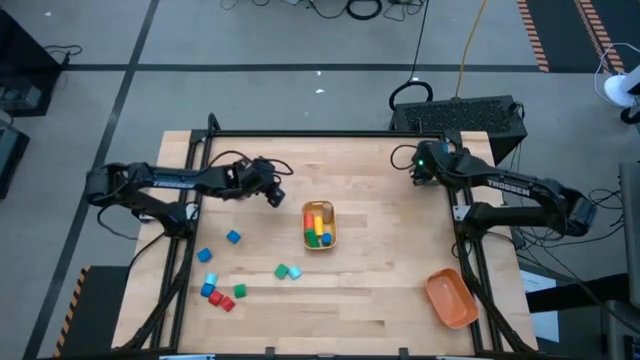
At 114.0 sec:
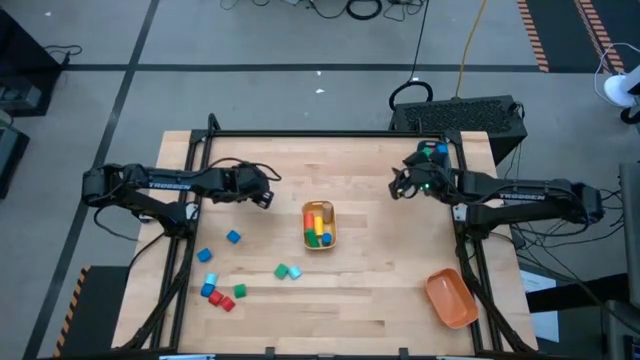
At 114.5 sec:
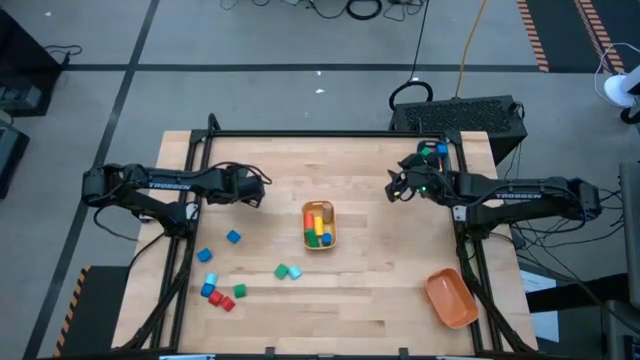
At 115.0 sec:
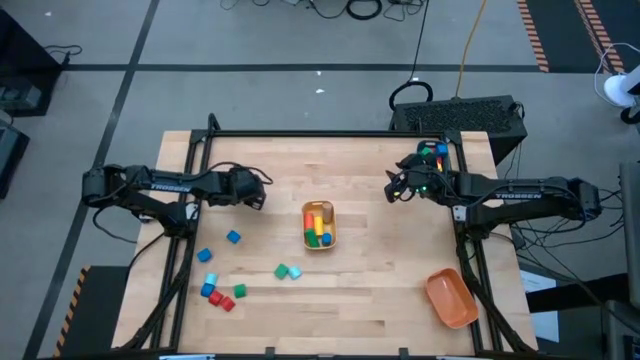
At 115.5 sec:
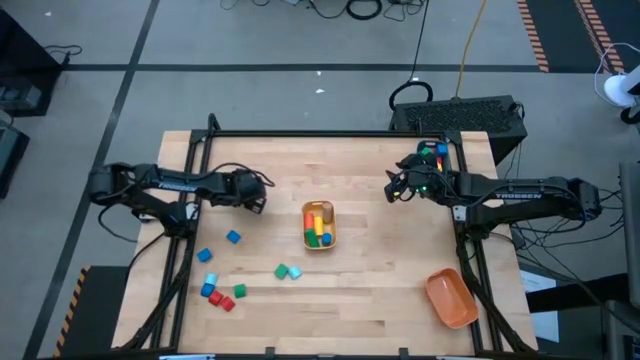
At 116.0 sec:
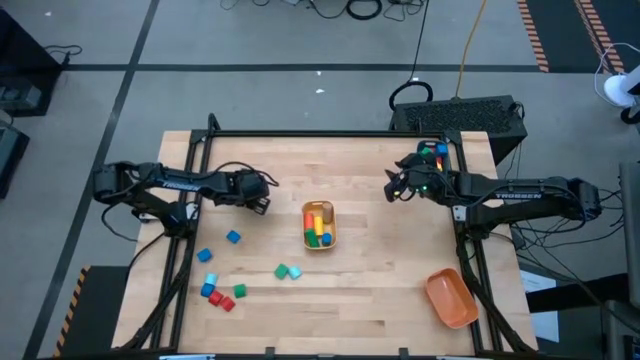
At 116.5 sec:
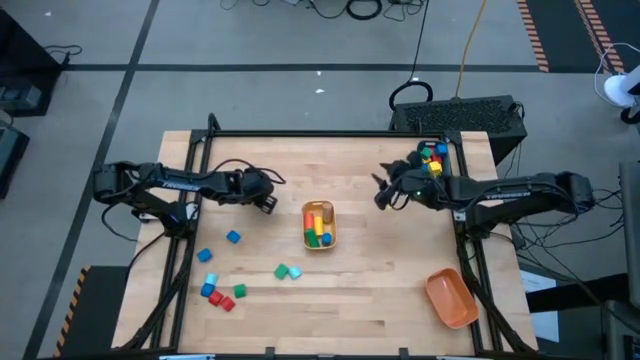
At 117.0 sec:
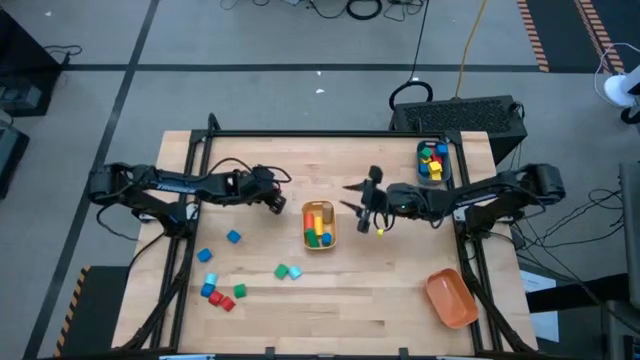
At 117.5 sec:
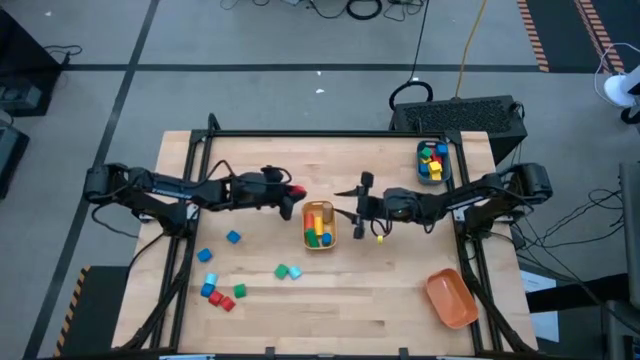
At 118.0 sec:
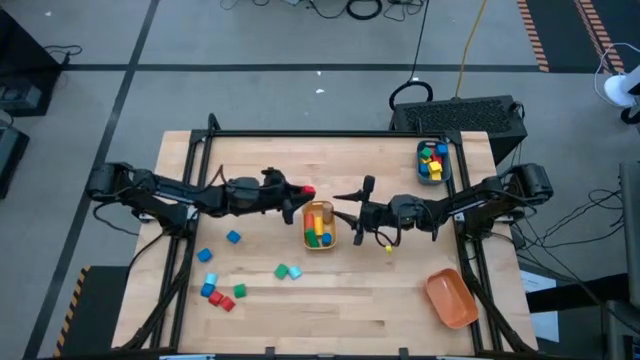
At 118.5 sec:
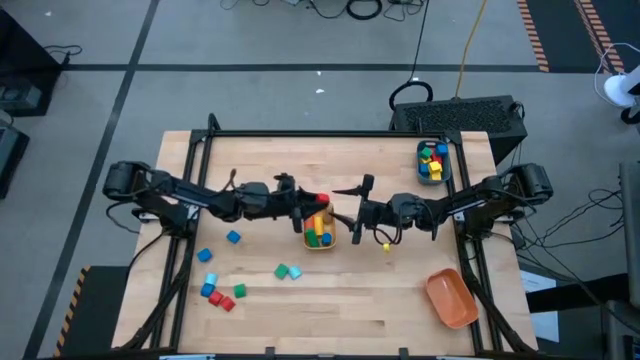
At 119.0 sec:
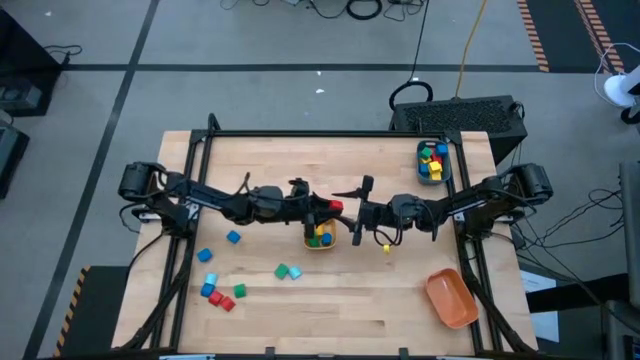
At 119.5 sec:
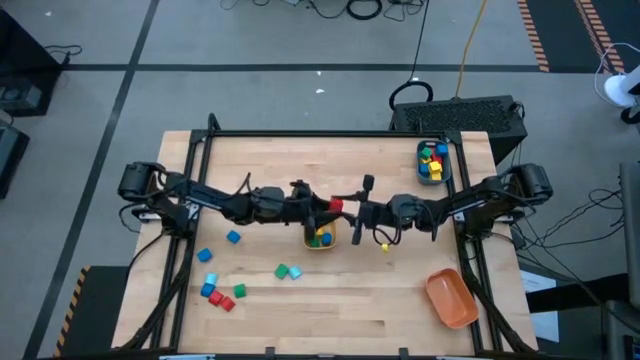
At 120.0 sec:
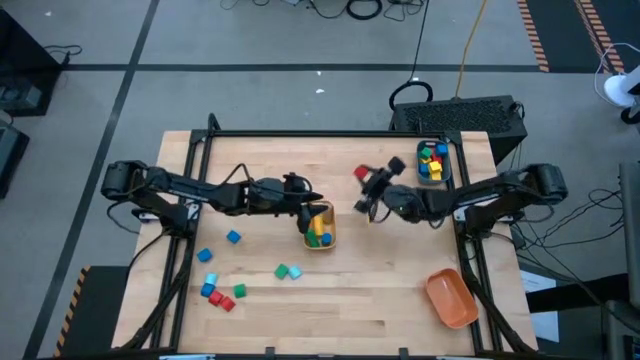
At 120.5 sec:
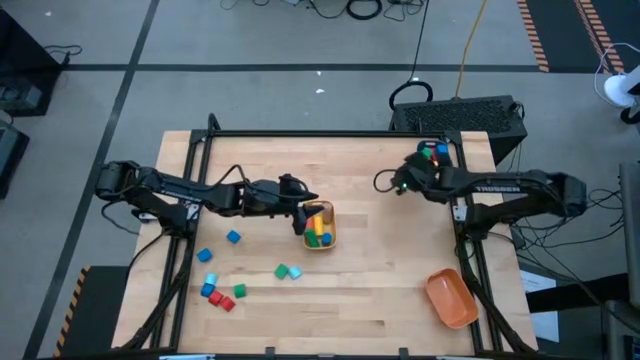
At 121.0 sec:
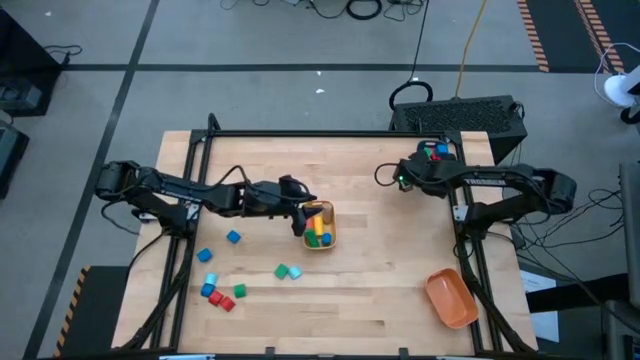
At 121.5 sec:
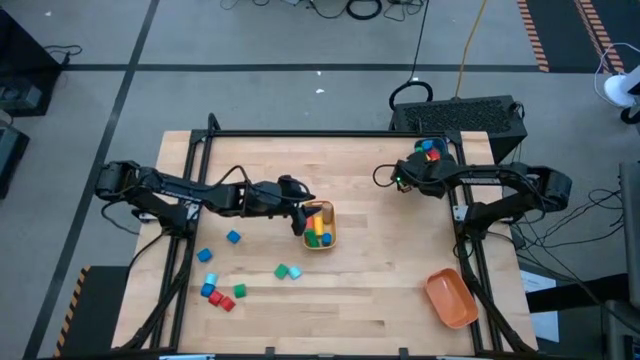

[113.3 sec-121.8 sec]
Task: Sort blocks by size
Put the red square block into the blue bin

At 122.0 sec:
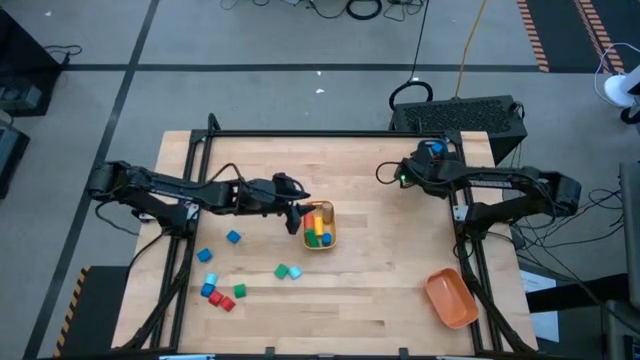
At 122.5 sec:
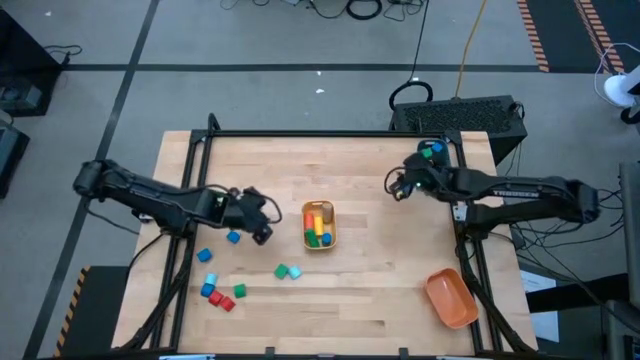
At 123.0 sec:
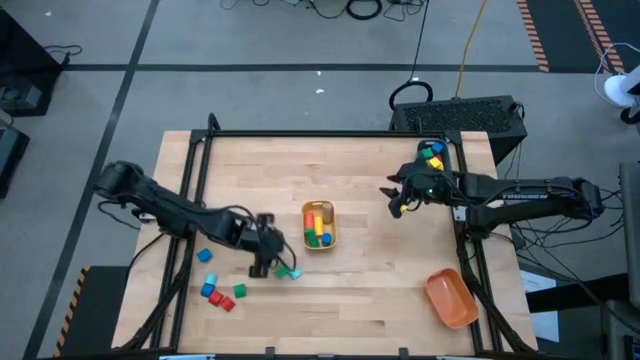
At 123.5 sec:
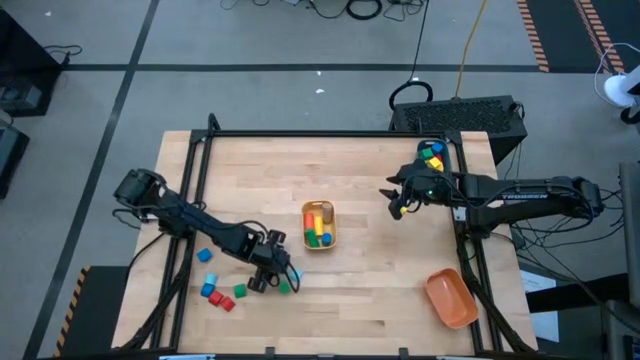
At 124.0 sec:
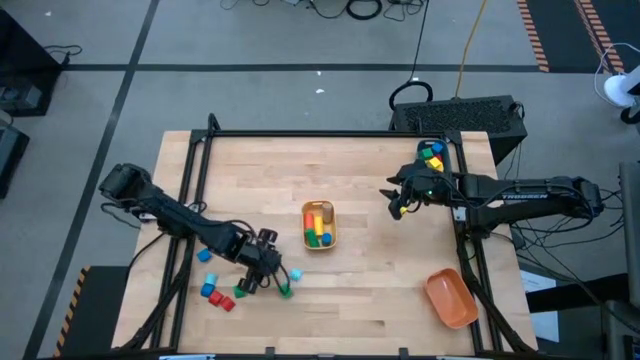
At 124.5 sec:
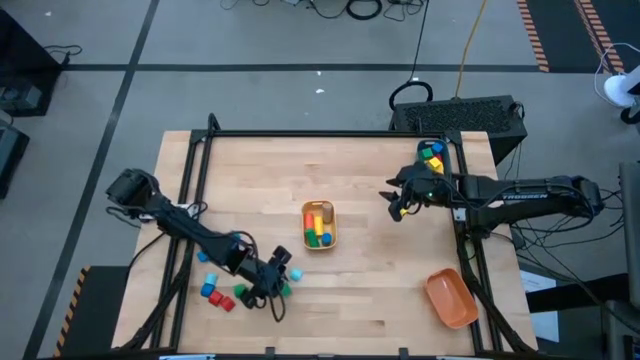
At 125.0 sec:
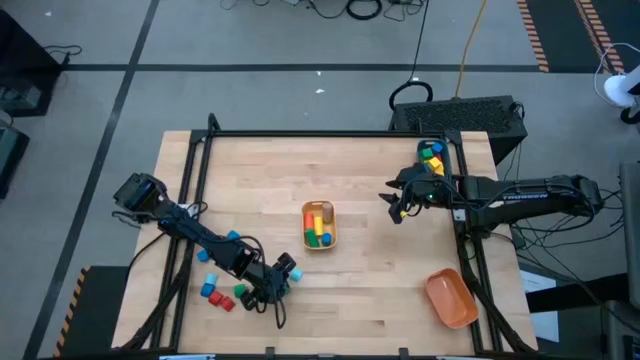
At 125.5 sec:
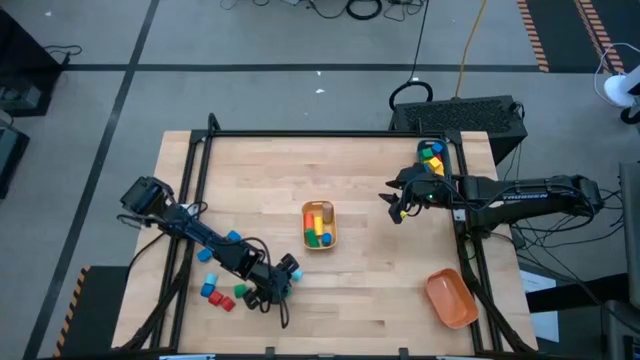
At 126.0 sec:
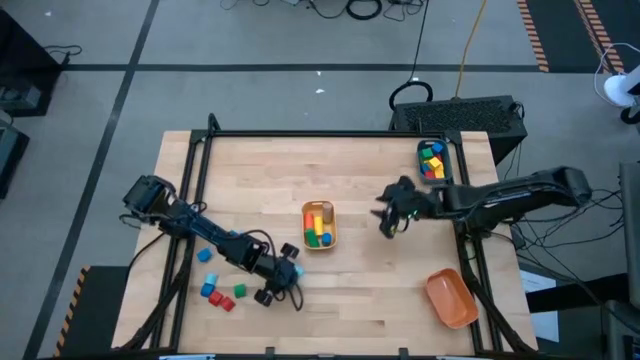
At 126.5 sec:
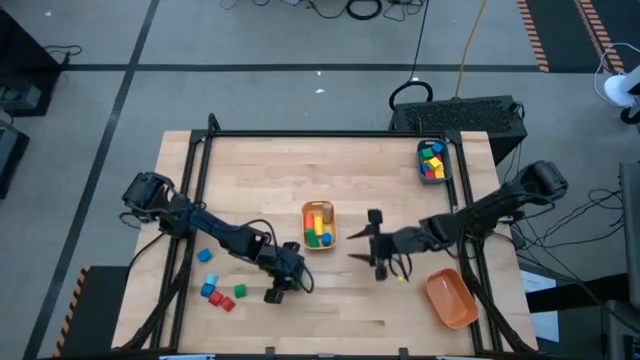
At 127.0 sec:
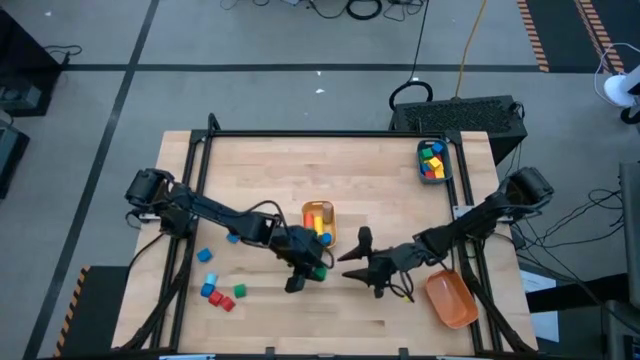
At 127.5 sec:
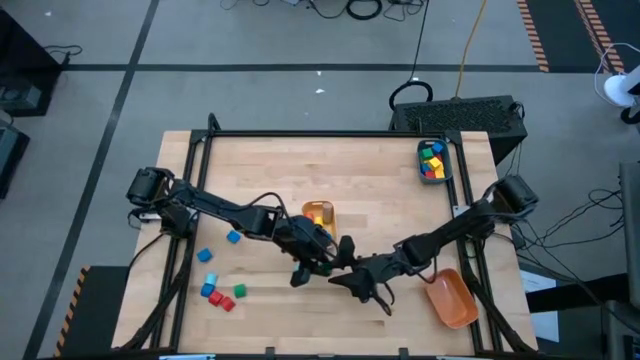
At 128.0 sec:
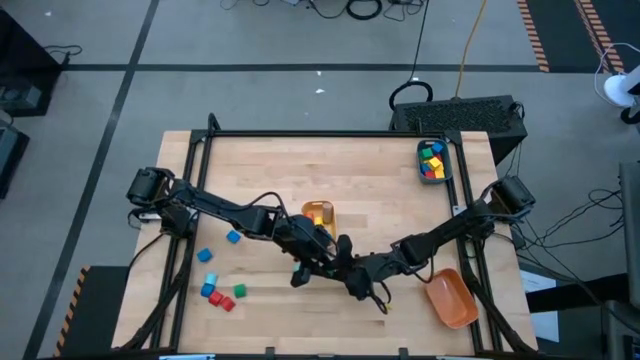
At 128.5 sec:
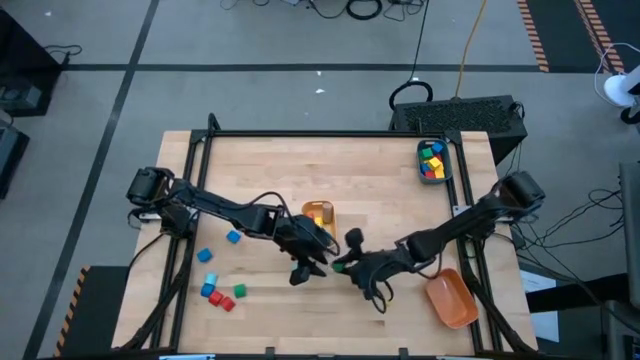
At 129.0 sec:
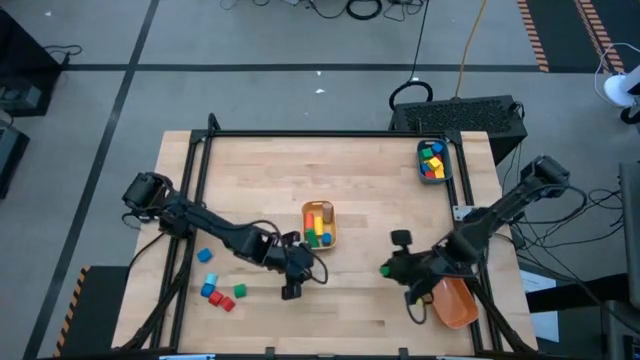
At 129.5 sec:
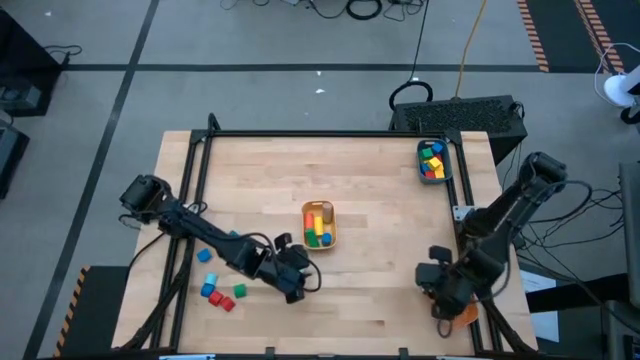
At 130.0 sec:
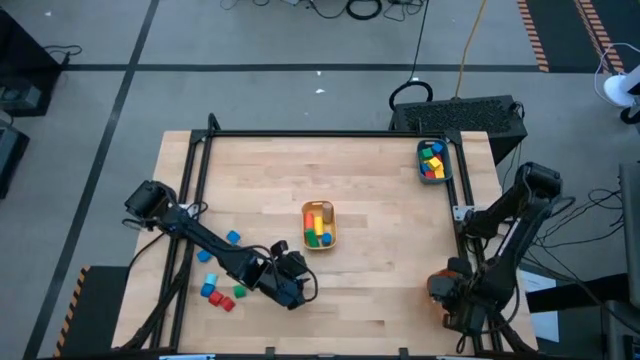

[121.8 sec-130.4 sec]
Put the green half-circle block into the orange bin

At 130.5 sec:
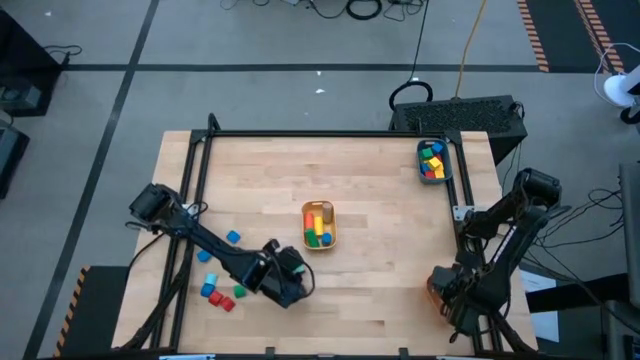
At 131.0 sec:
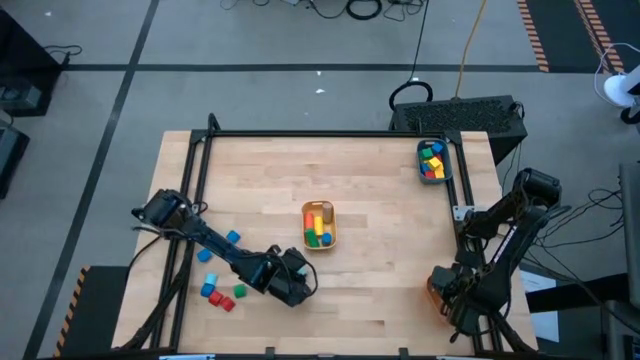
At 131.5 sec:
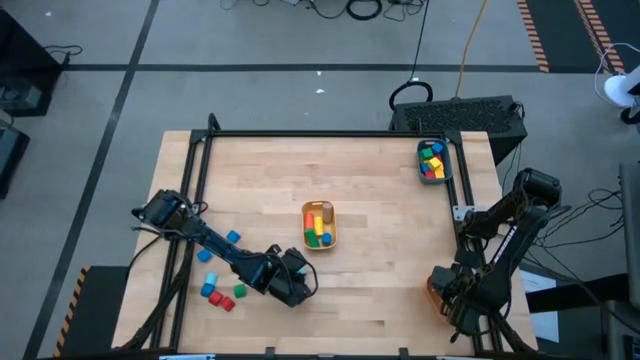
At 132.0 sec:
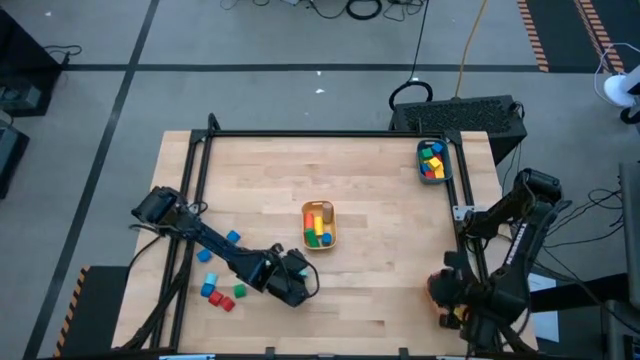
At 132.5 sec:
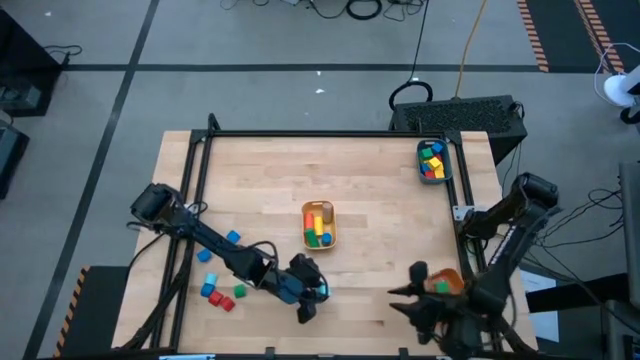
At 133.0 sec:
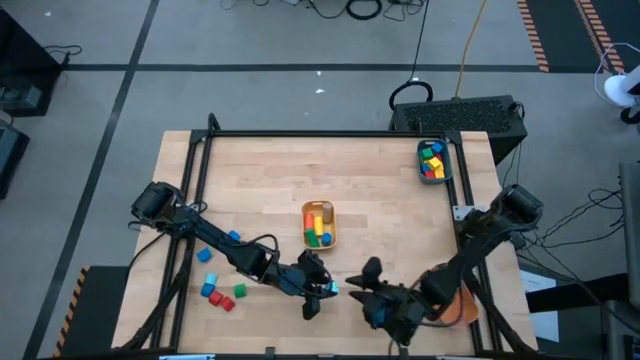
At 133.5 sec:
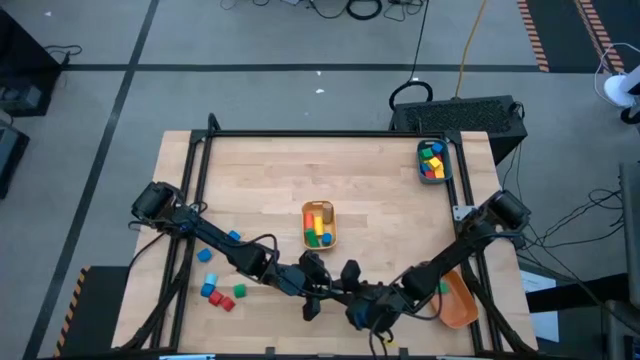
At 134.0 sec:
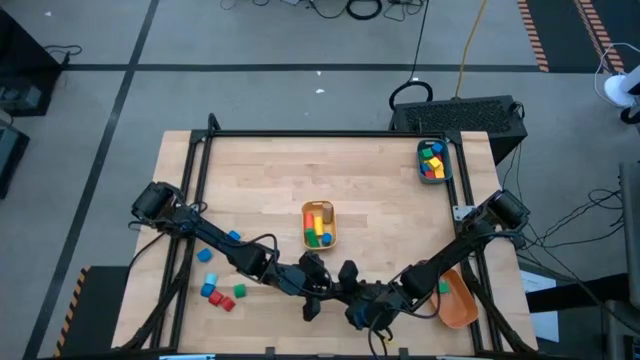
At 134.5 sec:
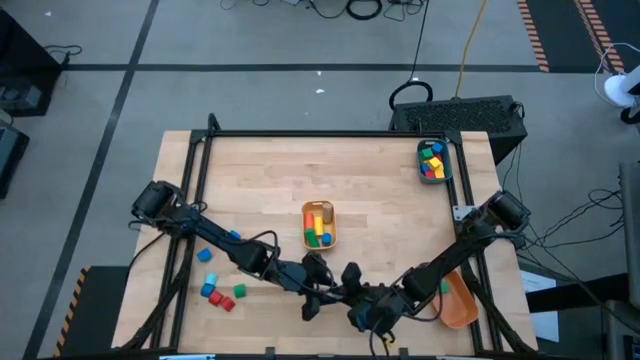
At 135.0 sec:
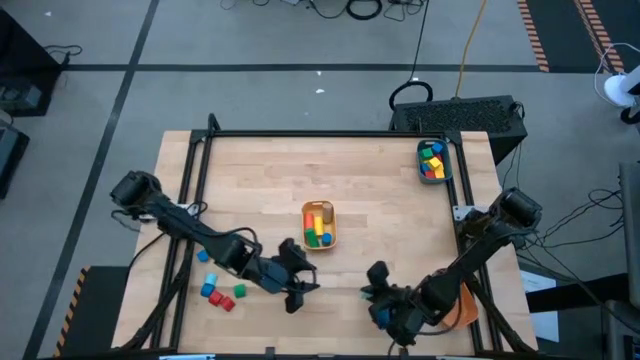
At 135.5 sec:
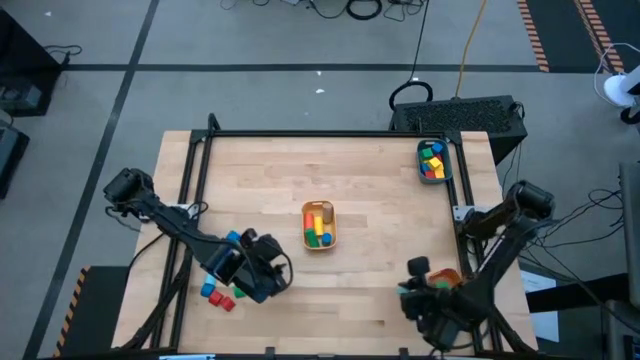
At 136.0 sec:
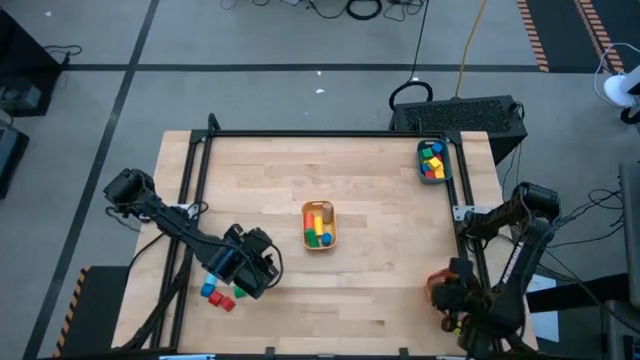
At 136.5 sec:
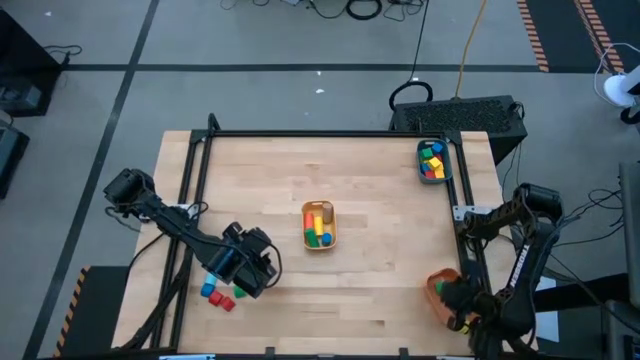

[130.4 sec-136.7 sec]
Put the light blue half-circle block into the orange bin
